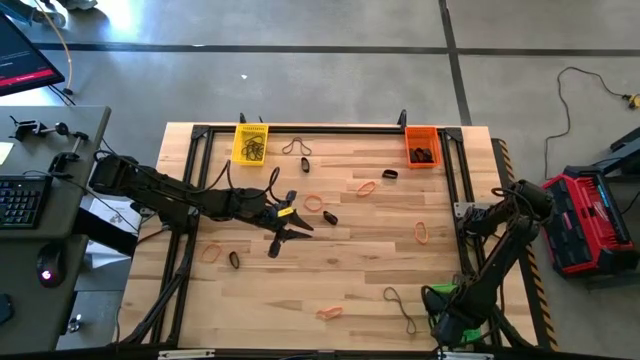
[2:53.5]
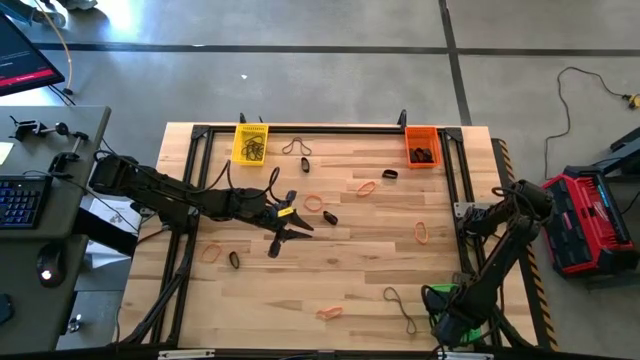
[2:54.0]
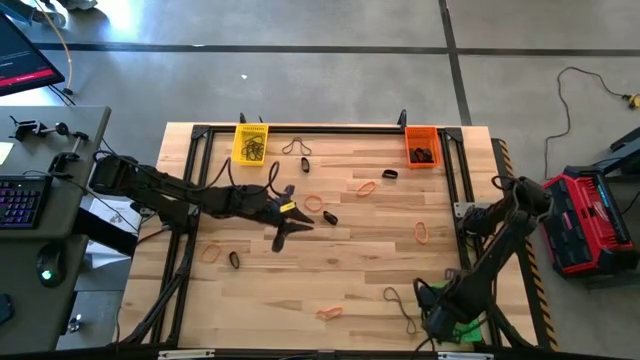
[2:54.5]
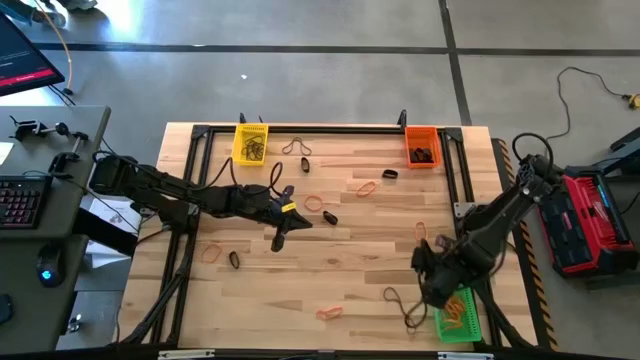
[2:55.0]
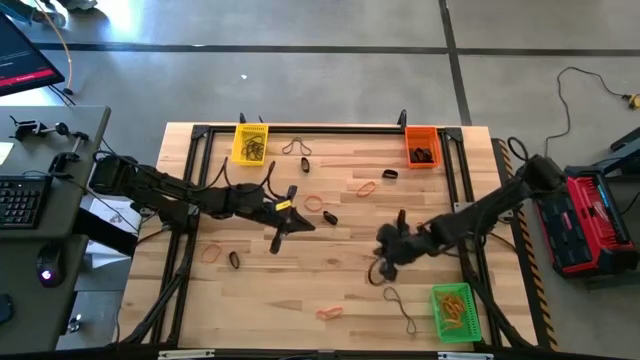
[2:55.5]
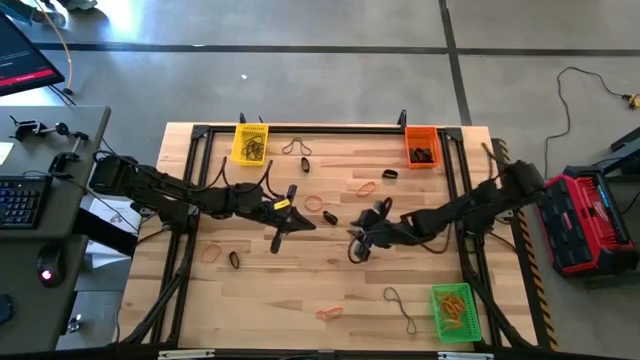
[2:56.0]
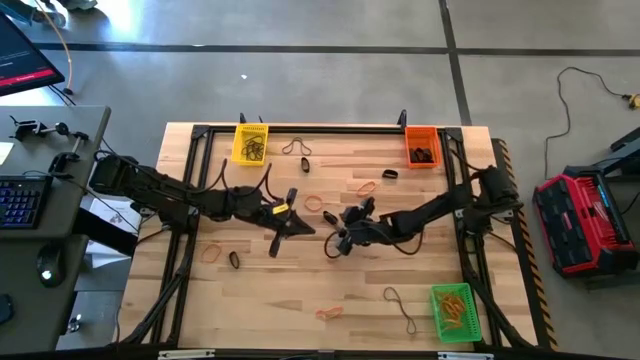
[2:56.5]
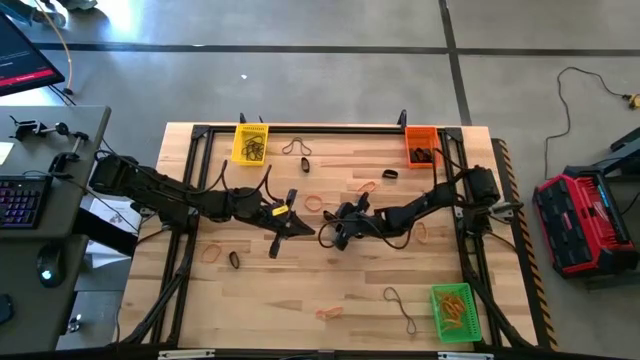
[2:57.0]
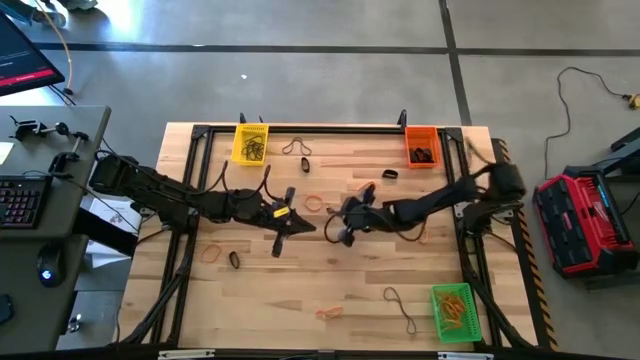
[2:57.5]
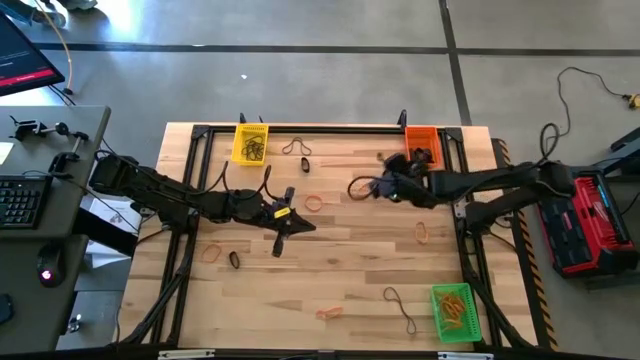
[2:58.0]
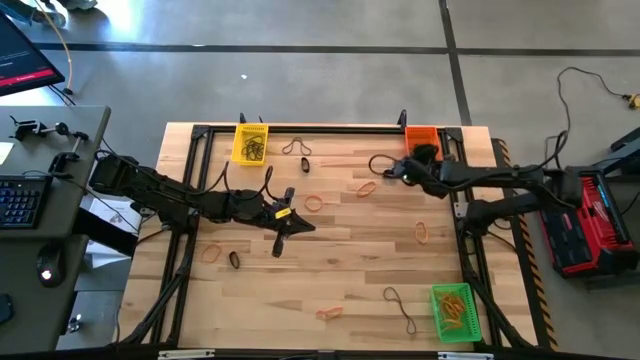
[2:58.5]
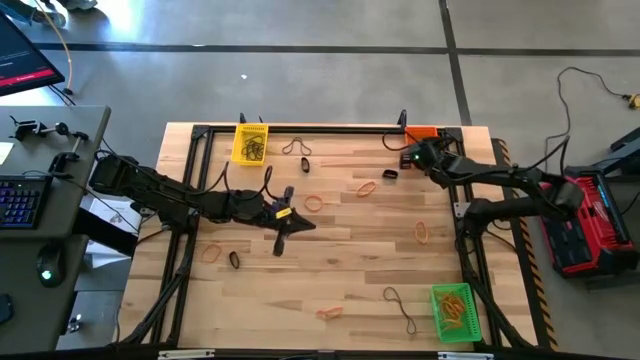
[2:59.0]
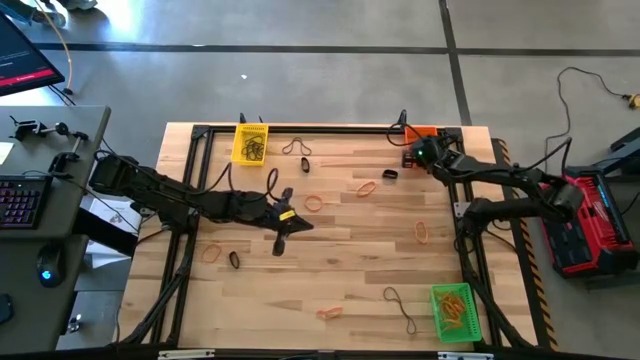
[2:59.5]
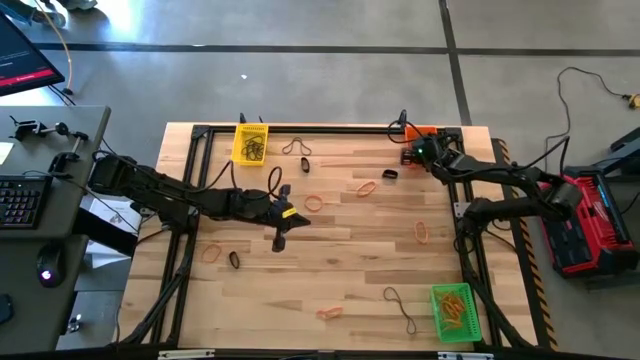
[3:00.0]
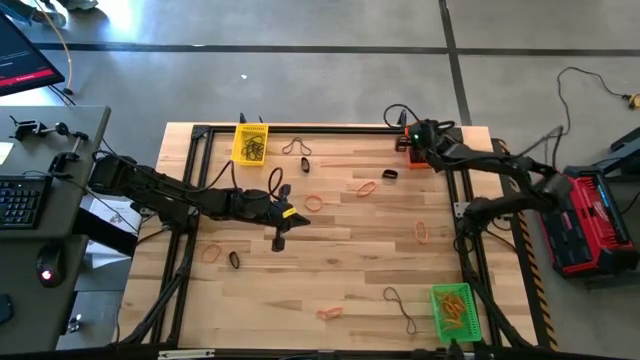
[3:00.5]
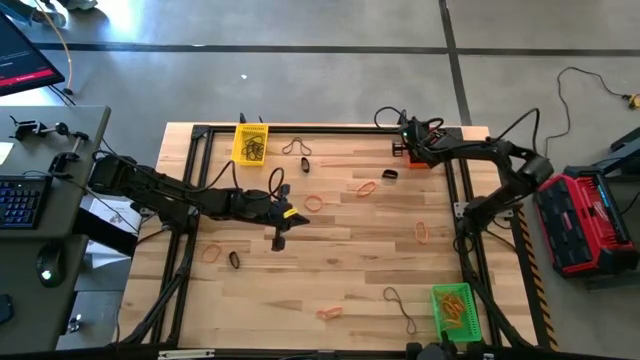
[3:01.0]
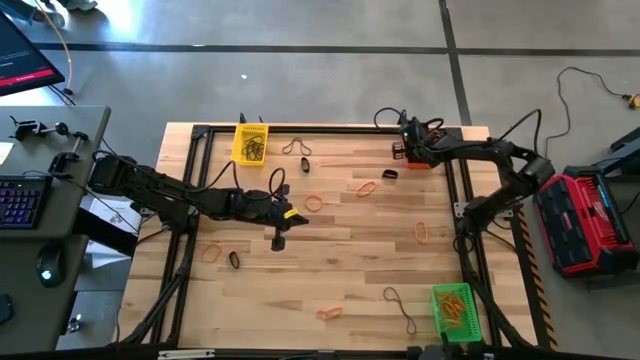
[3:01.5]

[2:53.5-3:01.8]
Task: Sort rubber bands into baskets
Put the black rubber band into the orange bin

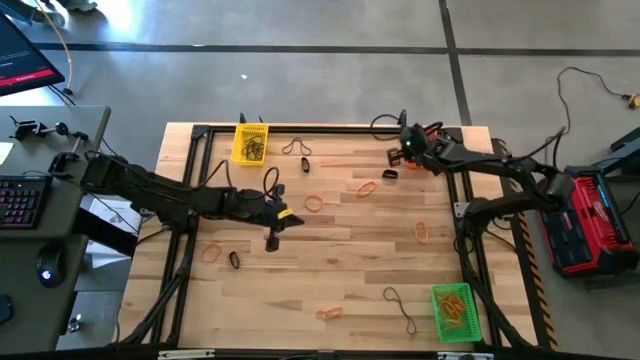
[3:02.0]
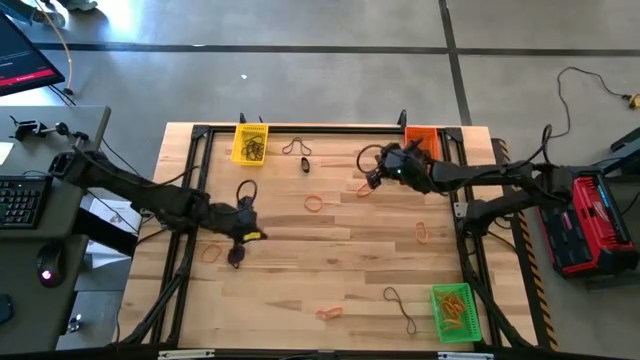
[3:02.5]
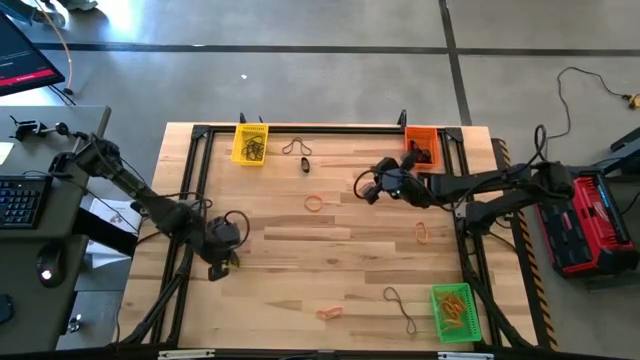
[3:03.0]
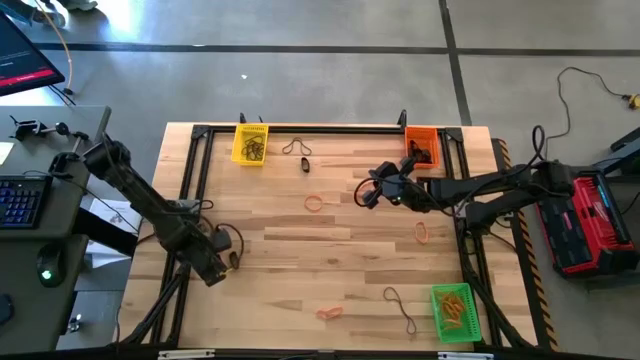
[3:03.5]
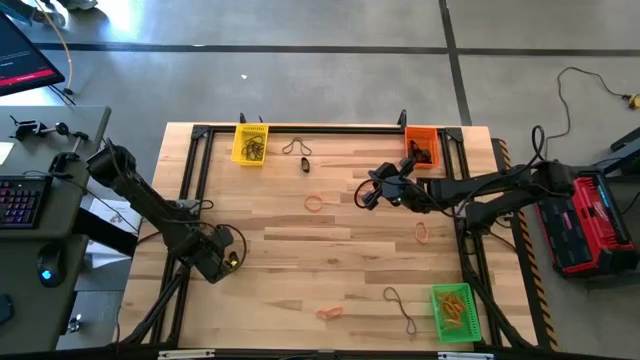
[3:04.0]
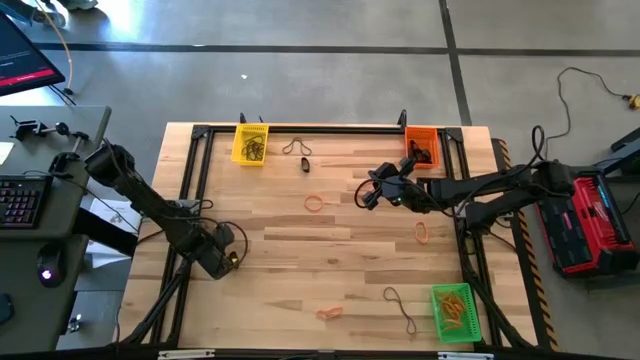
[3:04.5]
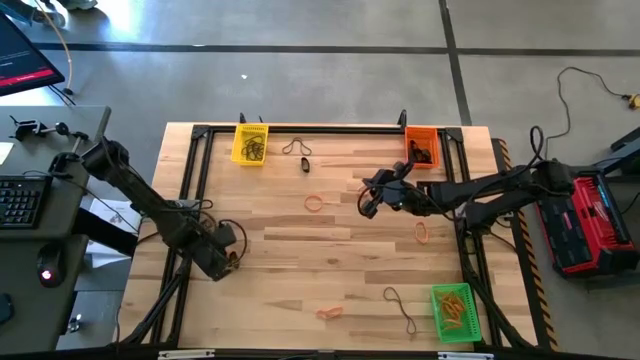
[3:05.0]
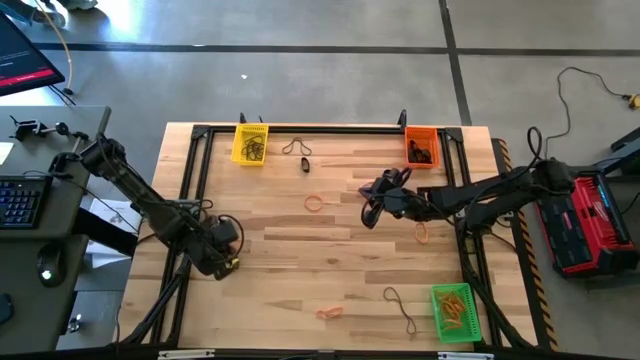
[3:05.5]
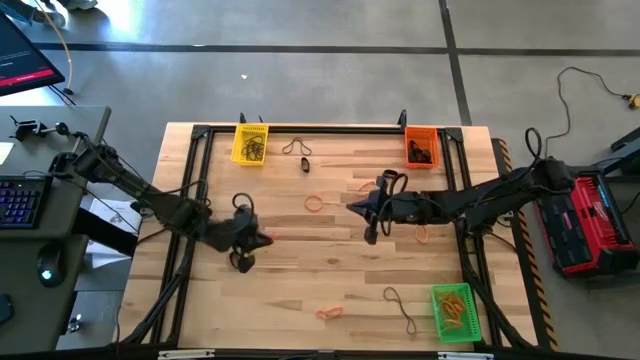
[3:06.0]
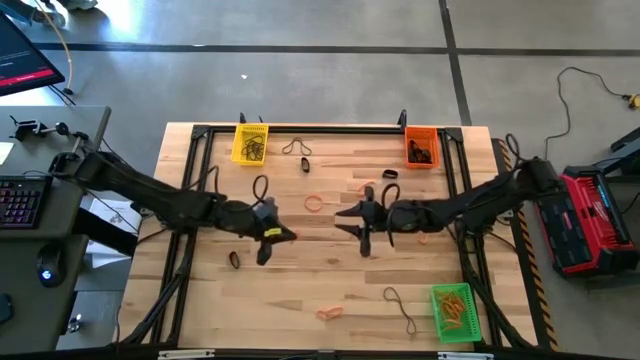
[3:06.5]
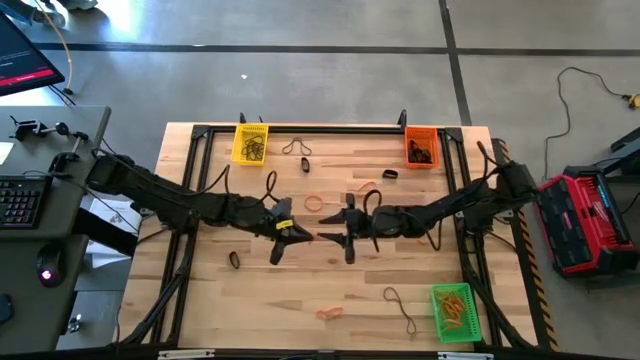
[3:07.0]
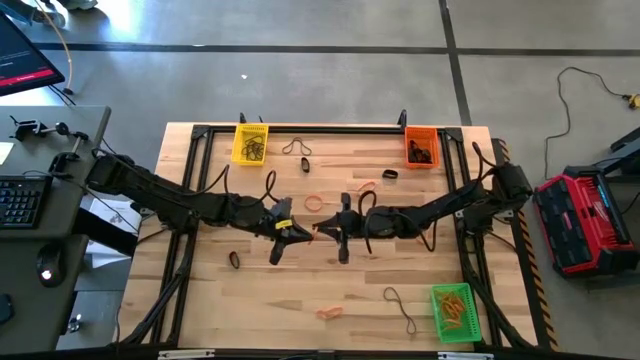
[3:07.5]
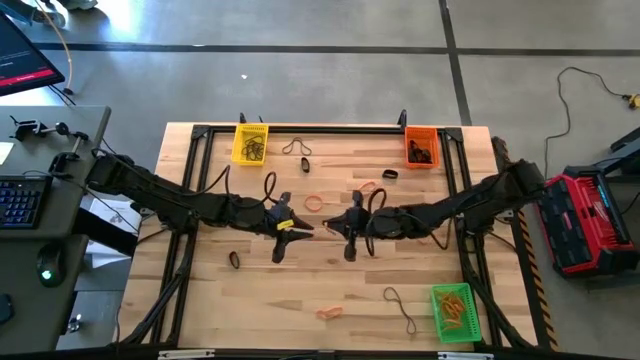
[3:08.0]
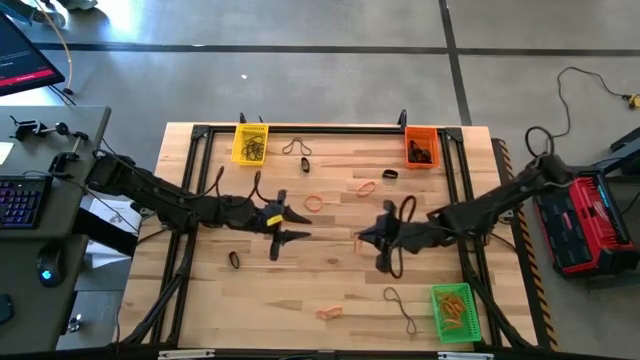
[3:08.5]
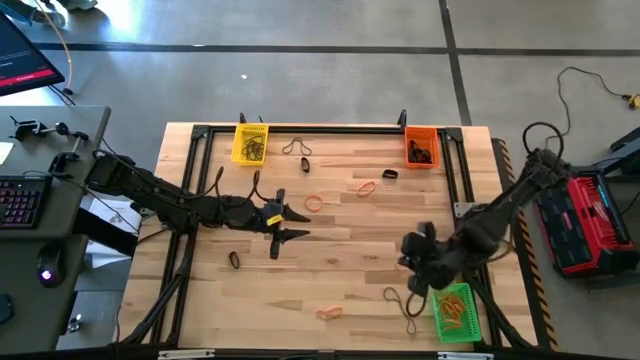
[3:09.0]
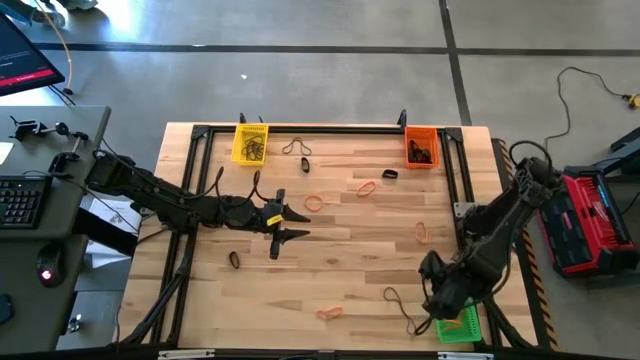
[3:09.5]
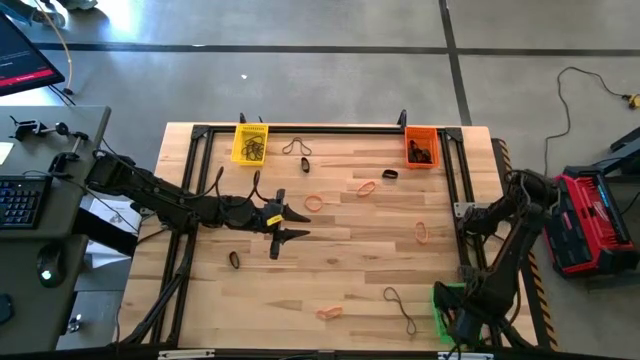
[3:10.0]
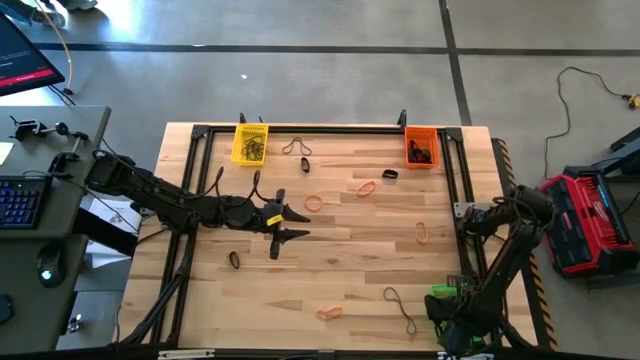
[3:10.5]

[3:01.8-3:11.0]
Put the orange rubber band into the green bin
